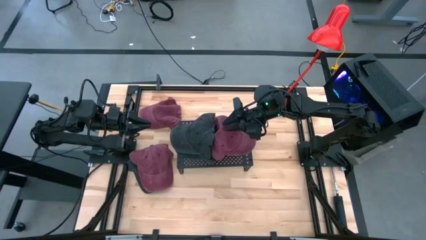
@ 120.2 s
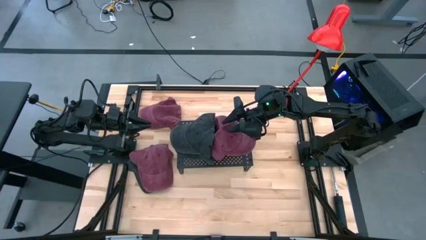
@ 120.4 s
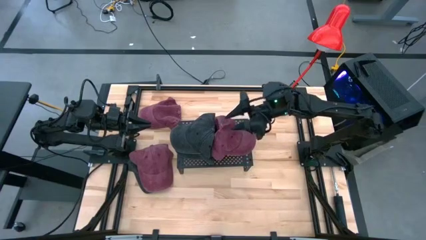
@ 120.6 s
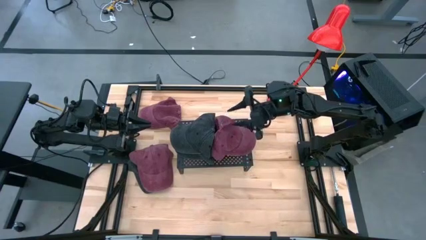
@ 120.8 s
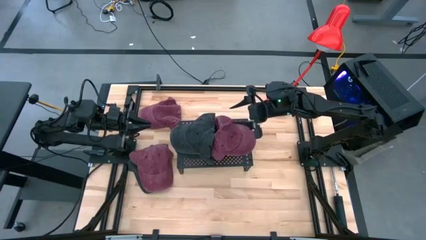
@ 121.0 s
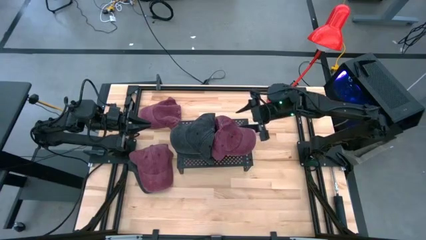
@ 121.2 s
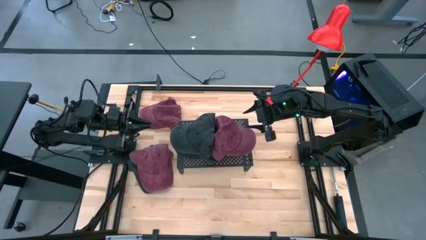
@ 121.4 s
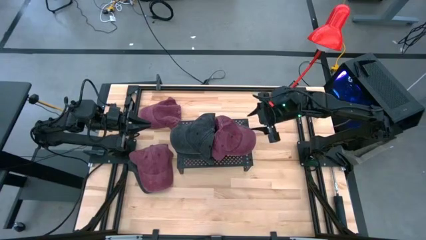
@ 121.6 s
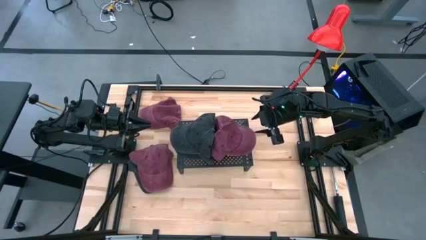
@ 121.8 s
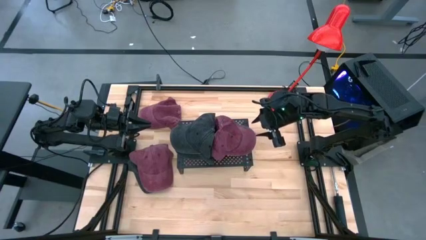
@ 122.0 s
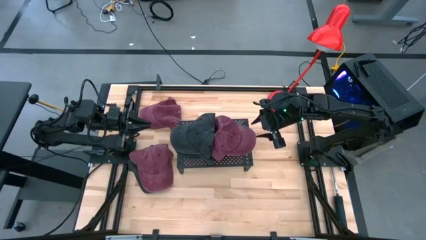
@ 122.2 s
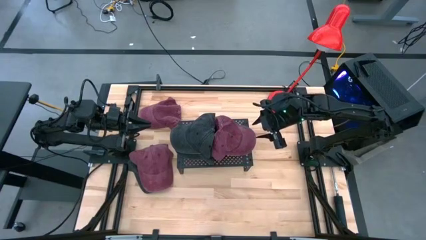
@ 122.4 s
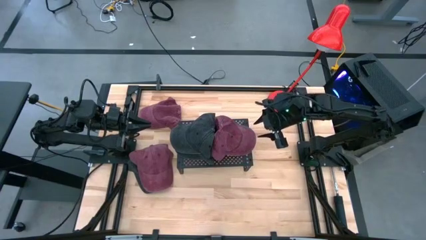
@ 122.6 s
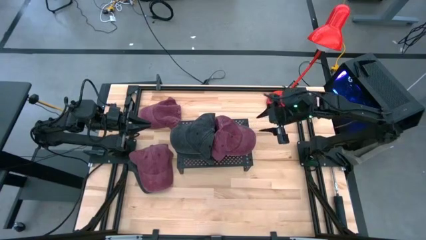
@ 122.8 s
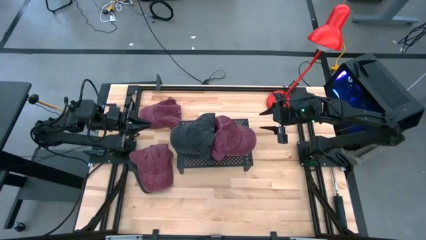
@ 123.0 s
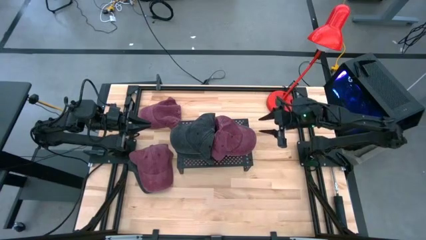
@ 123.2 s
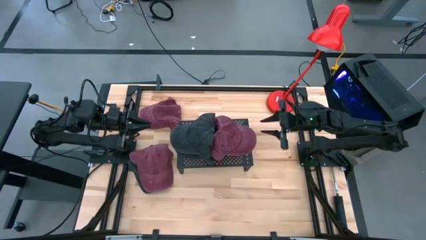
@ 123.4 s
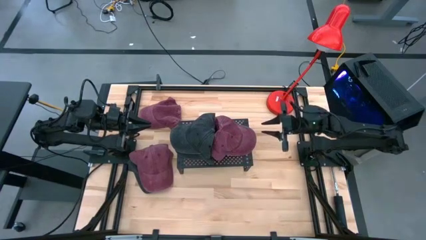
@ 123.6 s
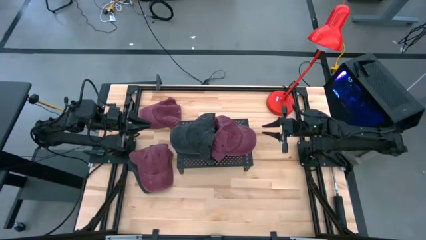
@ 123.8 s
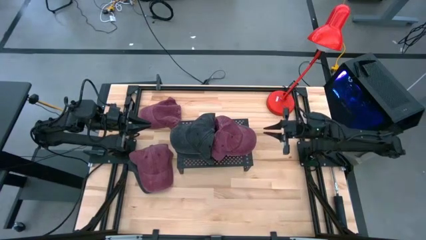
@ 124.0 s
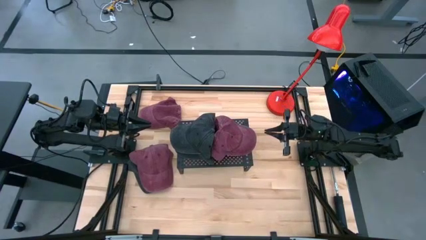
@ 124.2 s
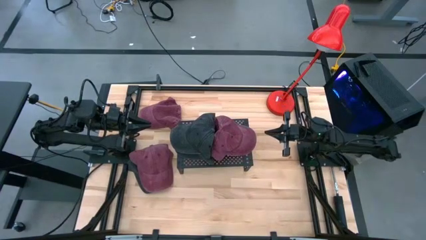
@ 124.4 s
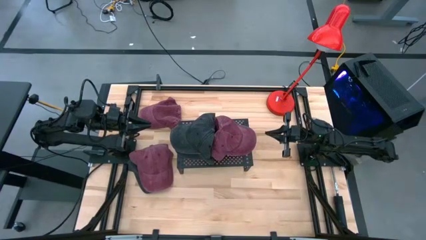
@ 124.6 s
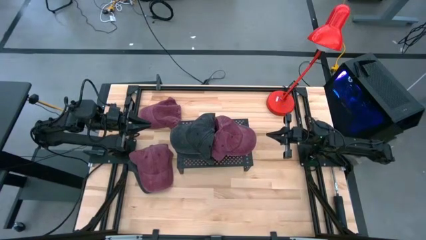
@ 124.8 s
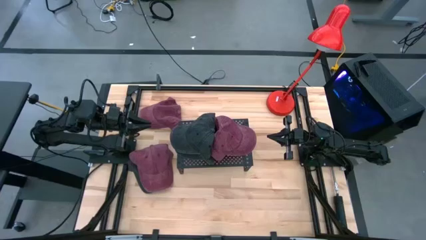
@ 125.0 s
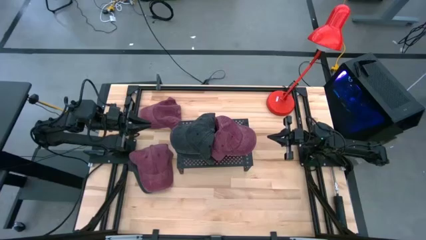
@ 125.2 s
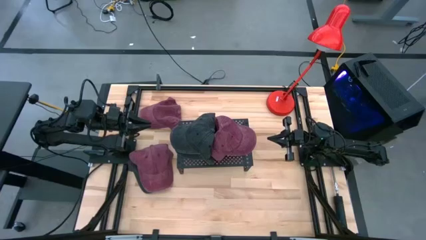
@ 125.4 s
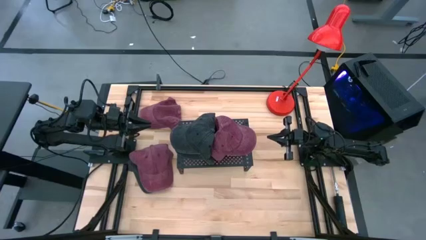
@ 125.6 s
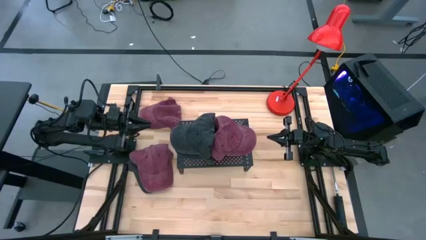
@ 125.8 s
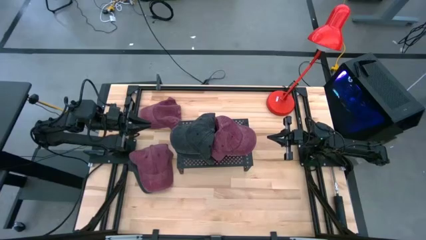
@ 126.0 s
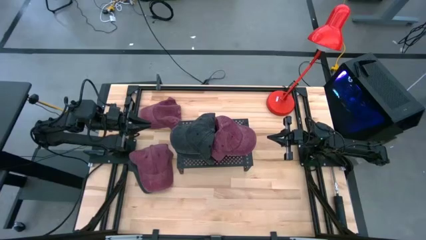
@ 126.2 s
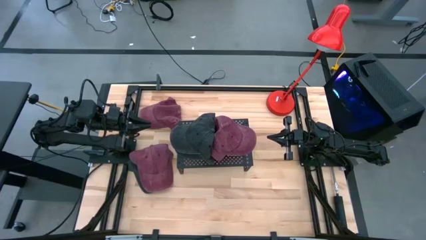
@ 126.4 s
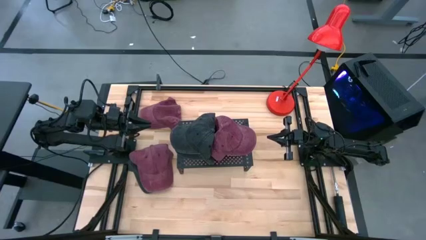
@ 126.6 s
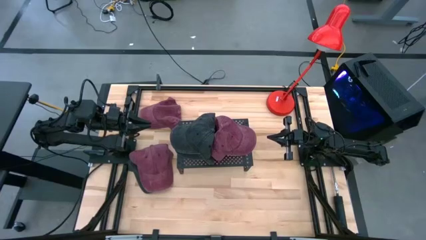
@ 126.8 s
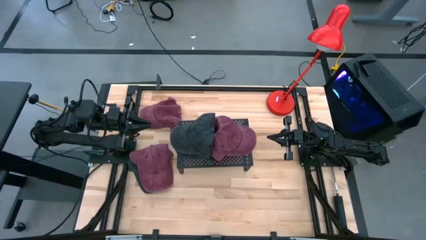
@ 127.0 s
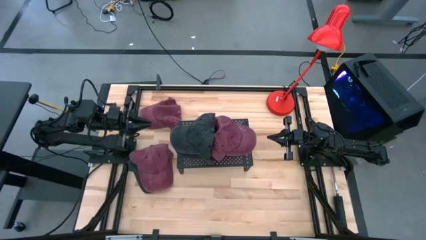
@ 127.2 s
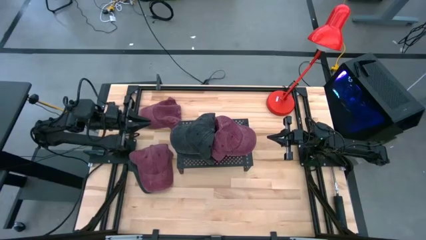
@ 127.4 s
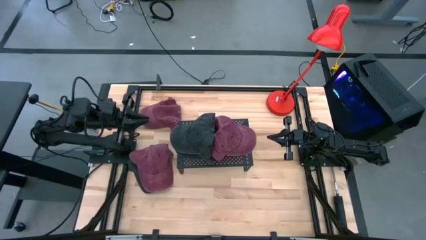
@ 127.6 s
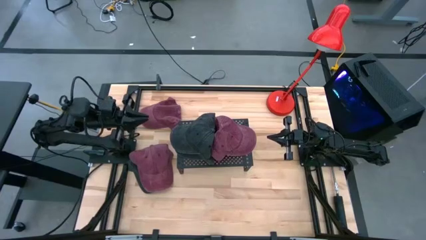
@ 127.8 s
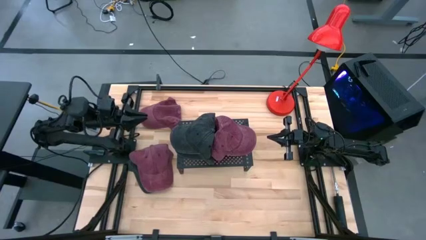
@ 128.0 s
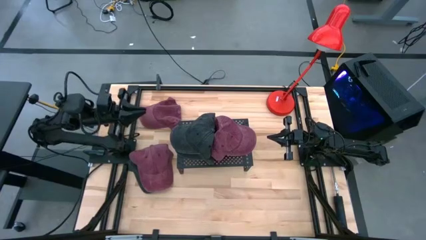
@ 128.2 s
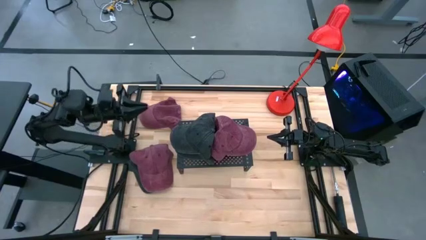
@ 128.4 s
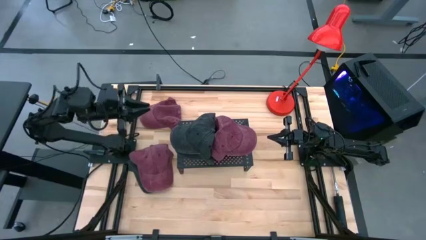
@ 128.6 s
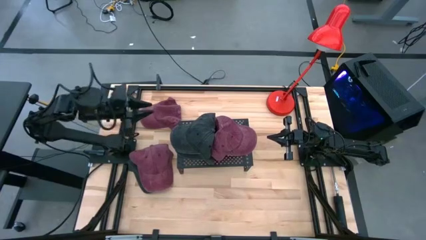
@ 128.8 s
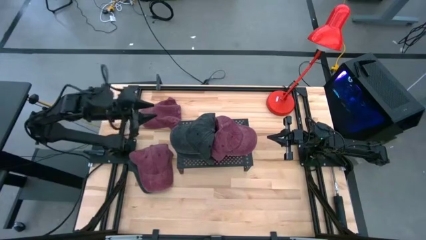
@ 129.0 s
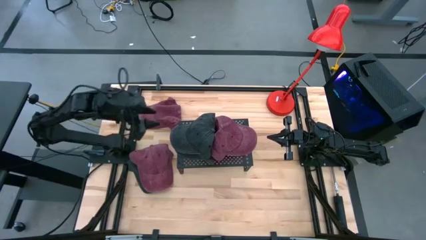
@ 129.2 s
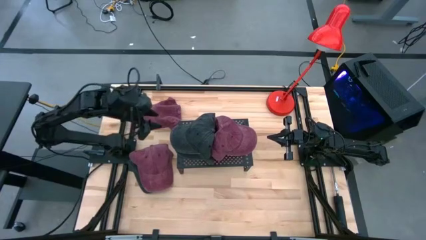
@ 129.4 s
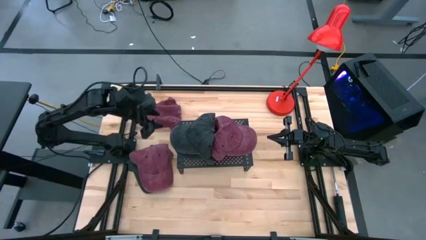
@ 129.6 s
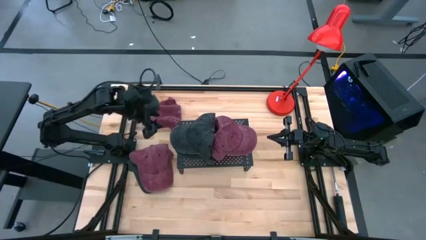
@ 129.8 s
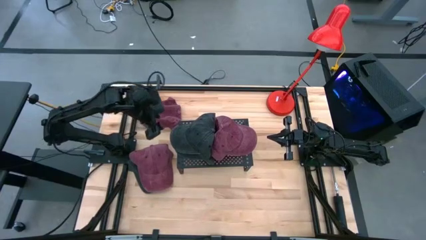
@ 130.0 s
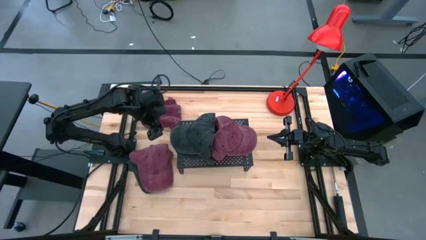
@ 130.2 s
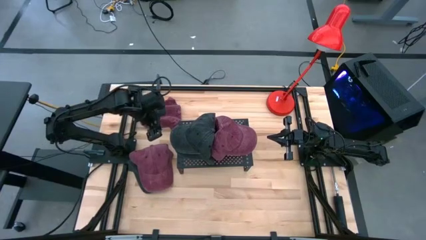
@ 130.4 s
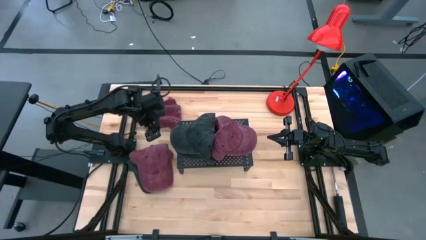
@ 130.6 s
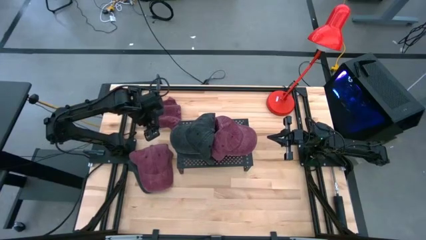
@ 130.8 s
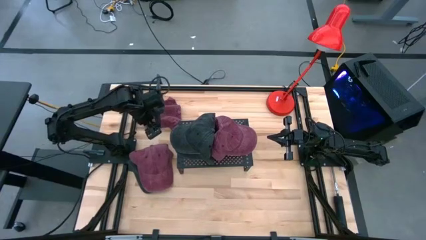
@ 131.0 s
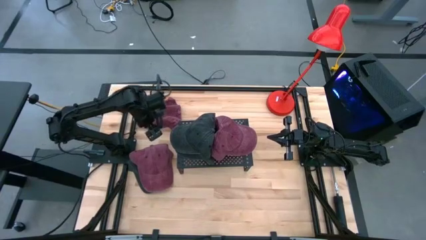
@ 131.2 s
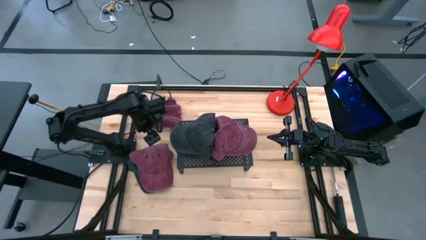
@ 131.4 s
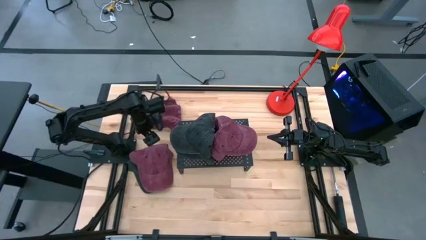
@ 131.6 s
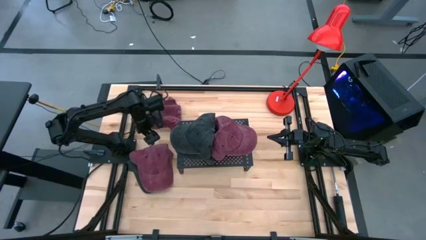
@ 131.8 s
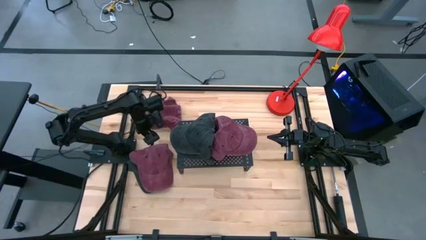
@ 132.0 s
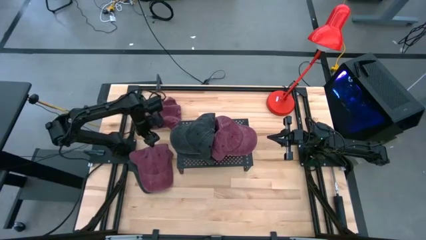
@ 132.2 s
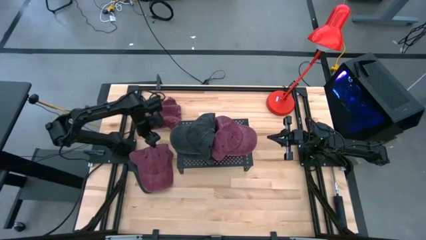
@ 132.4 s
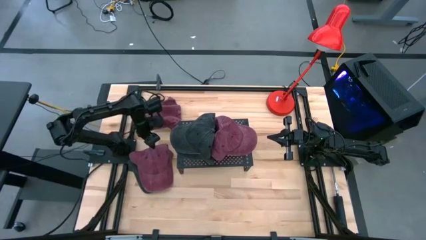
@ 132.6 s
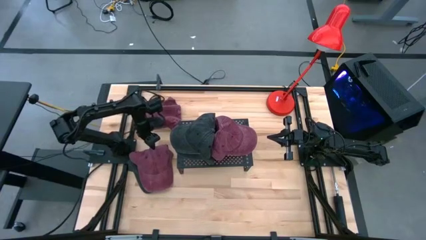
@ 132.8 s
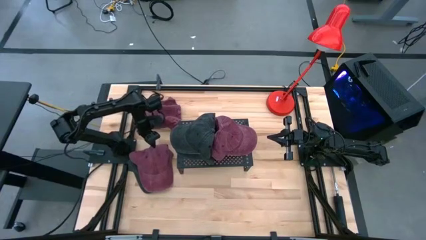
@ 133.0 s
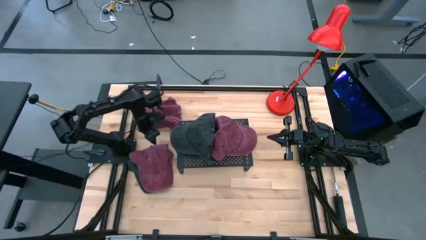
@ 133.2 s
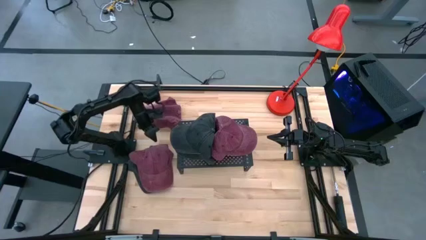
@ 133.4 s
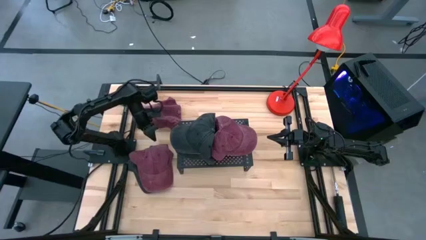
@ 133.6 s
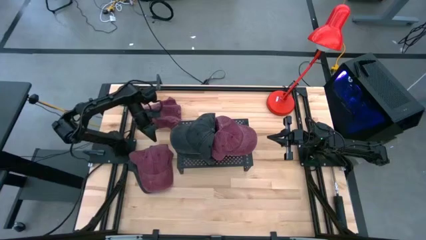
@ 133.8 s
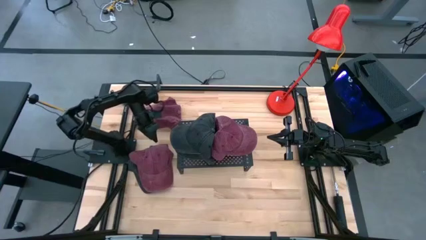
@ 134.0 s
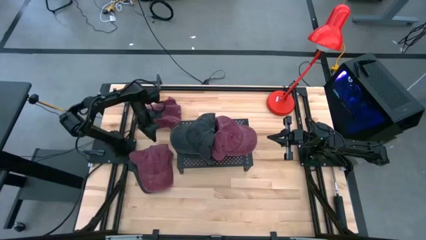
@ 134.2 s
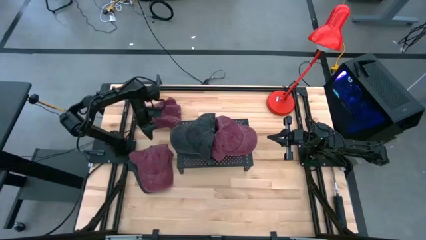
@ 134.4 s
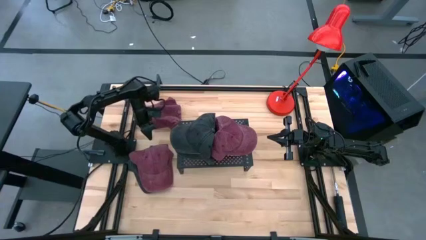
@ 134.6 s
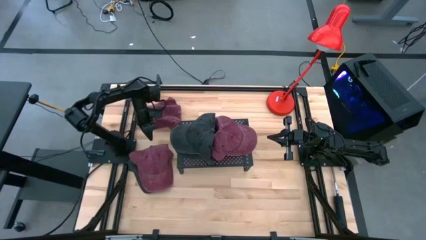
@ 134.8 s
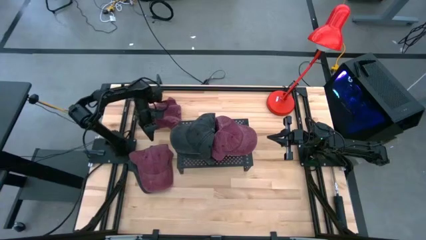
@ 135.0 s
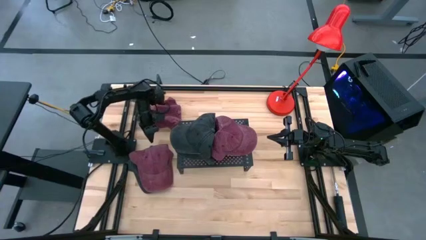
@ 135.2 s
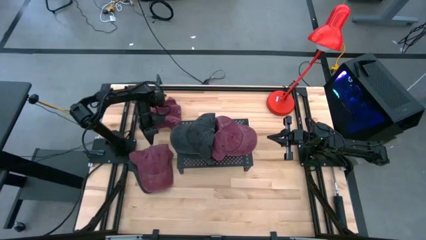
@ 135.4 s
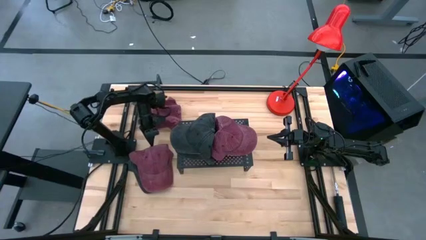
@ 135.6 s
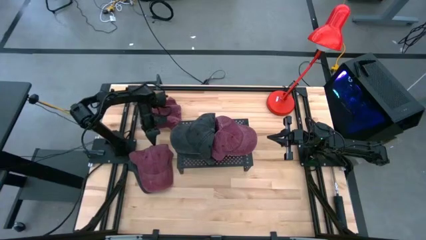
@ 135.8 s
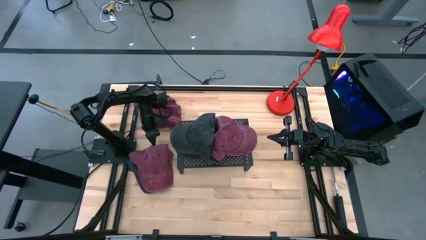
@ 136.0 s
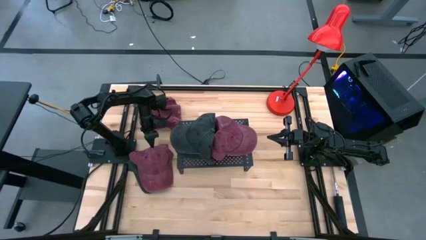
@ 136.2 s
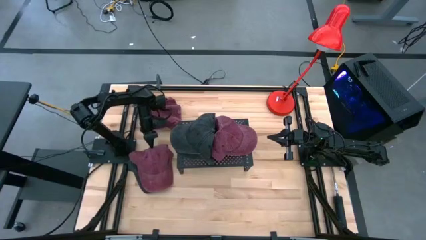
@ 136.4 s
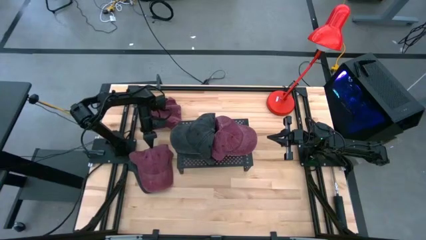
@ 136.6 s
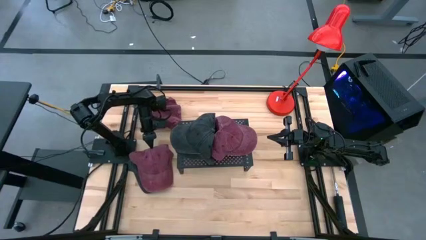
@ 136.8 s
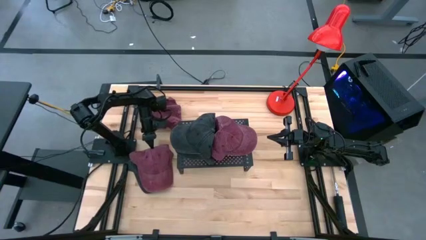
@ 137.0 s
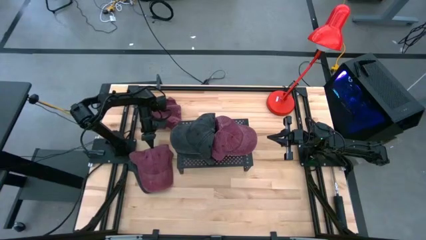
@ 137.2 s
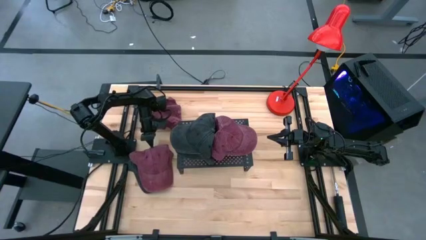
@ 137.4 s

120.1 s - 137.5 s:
Task: Pick & Place hat
Stack the top red cap on top of the red cap on the shelf
